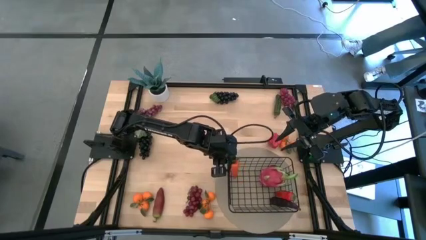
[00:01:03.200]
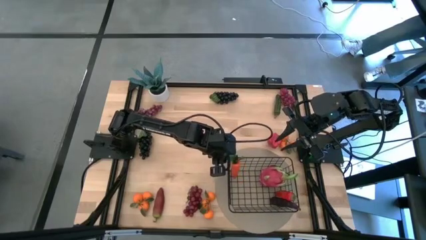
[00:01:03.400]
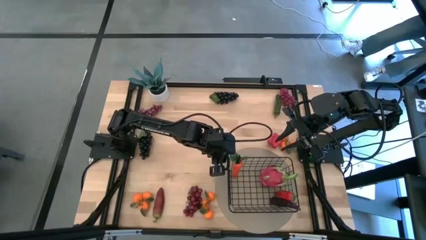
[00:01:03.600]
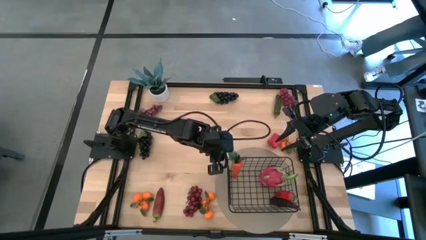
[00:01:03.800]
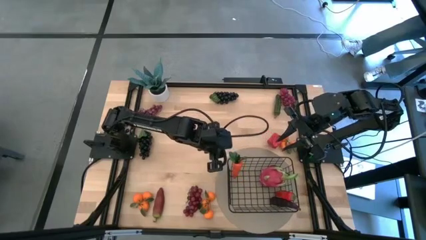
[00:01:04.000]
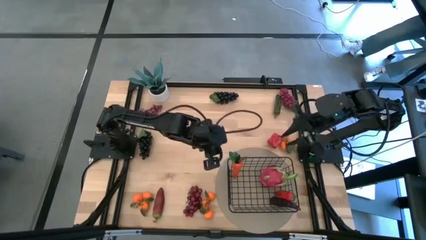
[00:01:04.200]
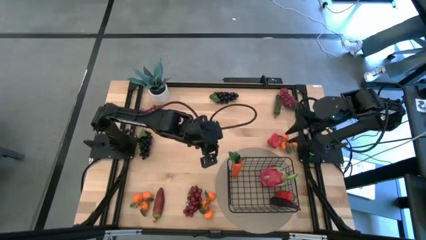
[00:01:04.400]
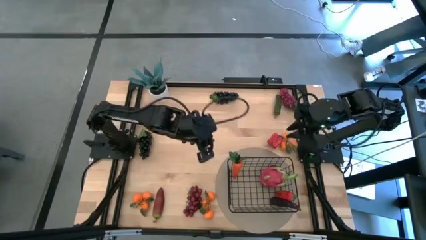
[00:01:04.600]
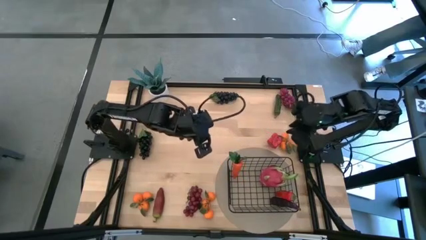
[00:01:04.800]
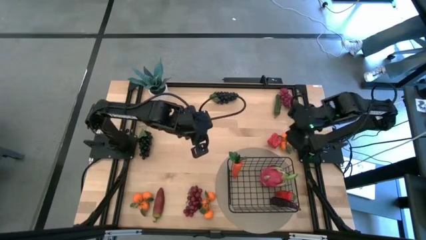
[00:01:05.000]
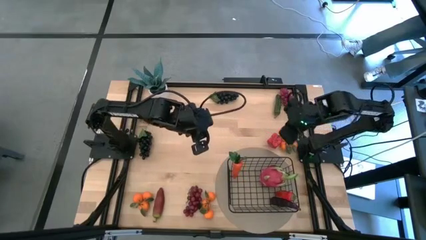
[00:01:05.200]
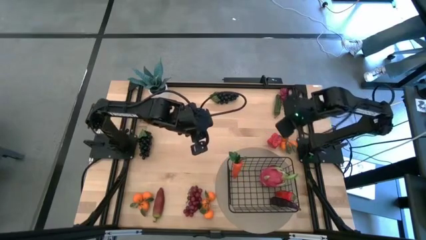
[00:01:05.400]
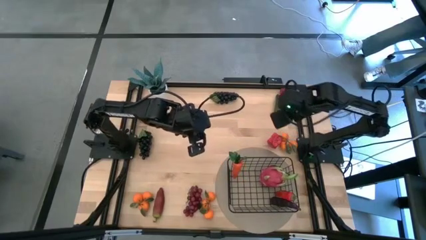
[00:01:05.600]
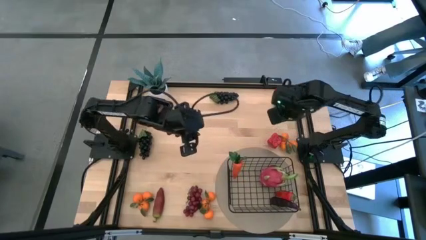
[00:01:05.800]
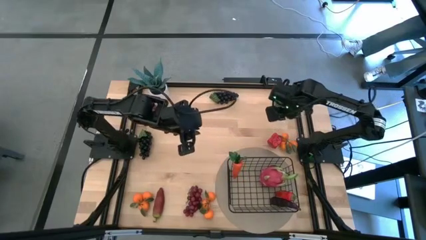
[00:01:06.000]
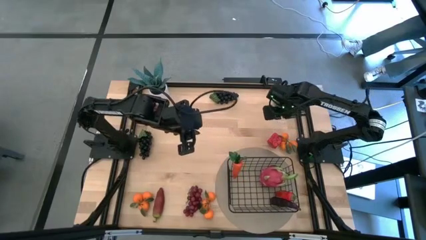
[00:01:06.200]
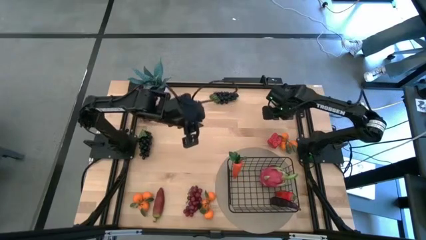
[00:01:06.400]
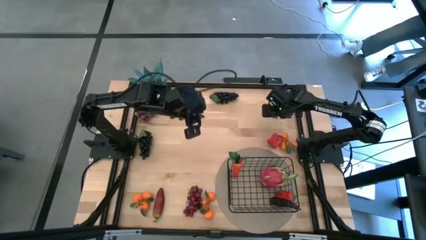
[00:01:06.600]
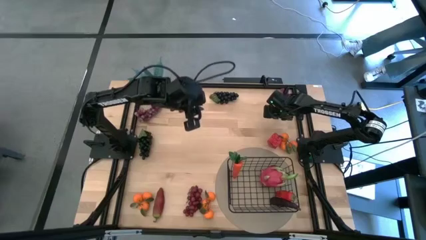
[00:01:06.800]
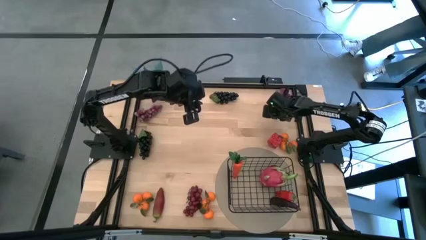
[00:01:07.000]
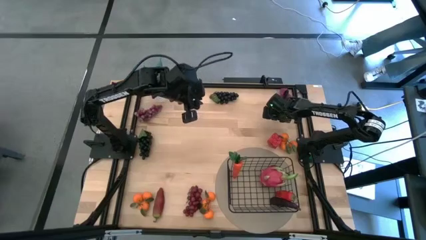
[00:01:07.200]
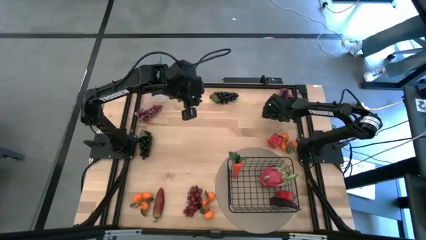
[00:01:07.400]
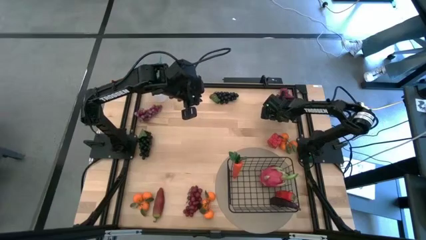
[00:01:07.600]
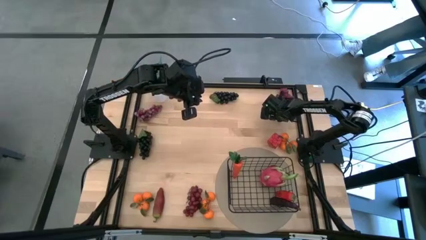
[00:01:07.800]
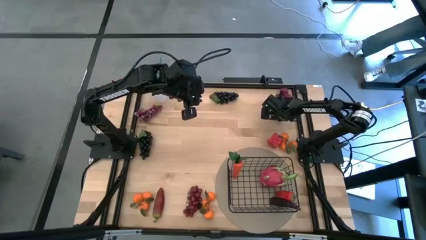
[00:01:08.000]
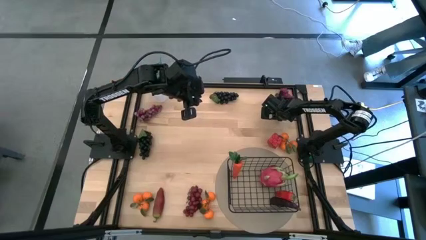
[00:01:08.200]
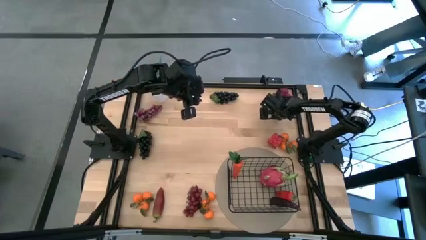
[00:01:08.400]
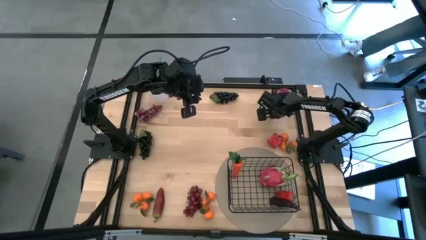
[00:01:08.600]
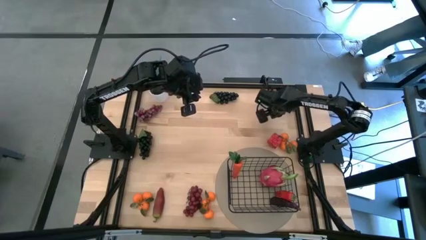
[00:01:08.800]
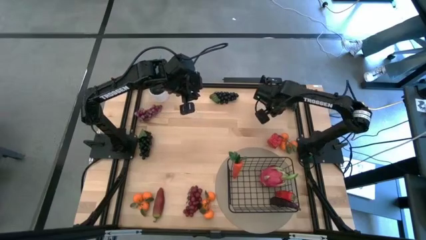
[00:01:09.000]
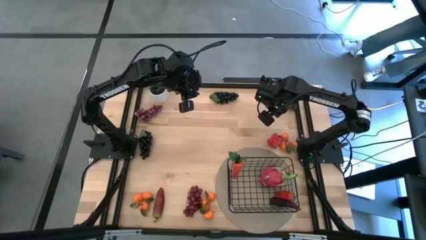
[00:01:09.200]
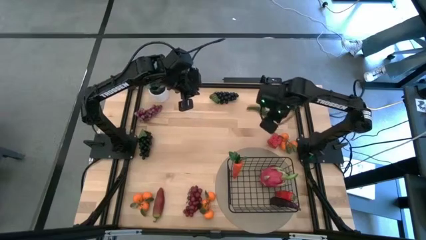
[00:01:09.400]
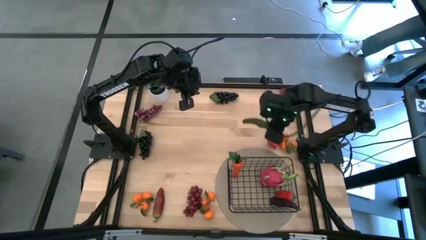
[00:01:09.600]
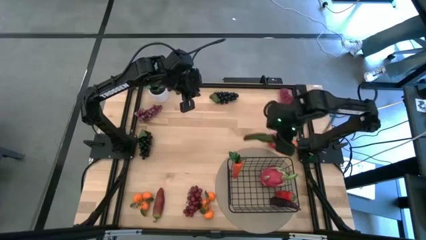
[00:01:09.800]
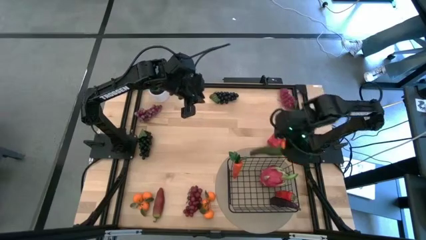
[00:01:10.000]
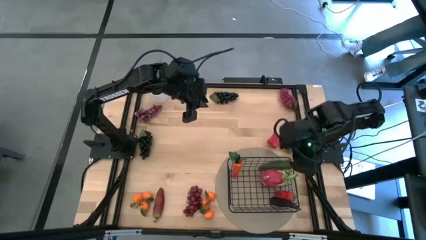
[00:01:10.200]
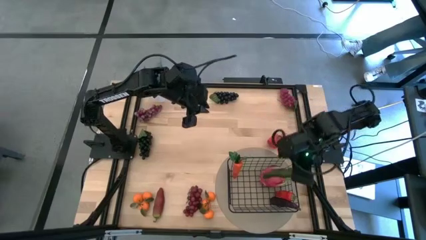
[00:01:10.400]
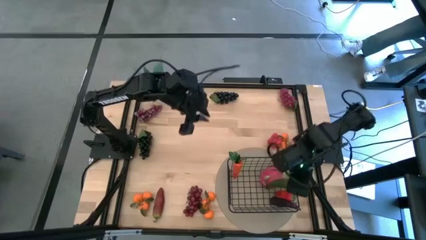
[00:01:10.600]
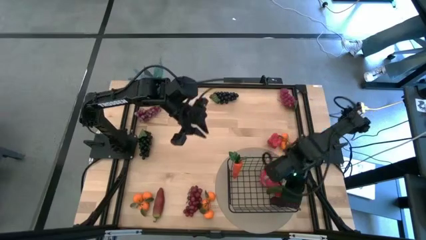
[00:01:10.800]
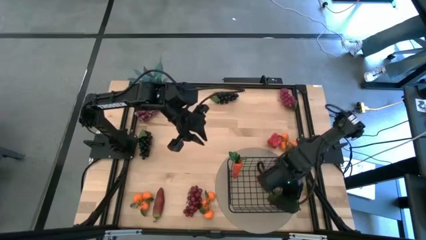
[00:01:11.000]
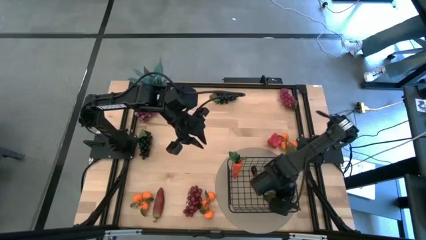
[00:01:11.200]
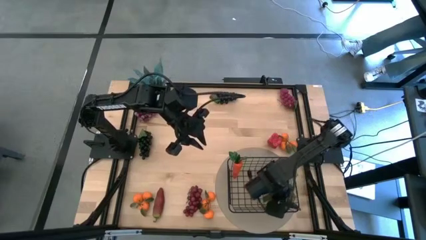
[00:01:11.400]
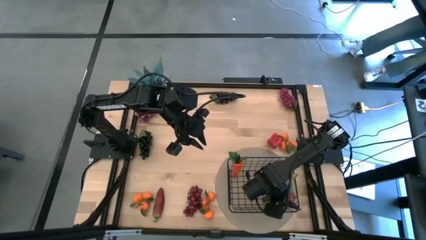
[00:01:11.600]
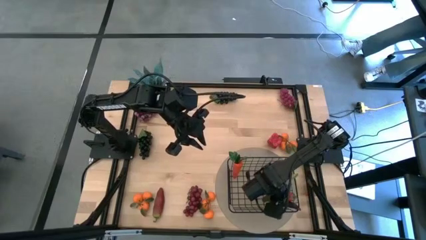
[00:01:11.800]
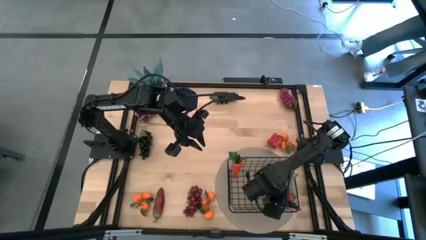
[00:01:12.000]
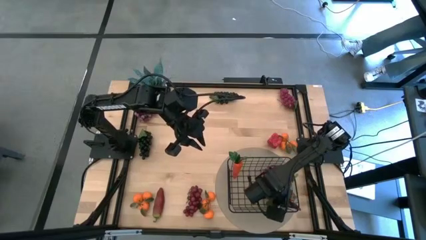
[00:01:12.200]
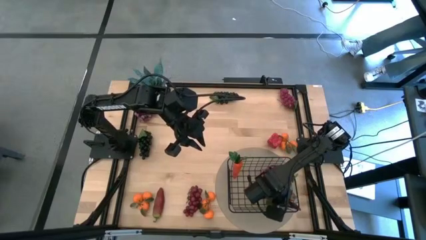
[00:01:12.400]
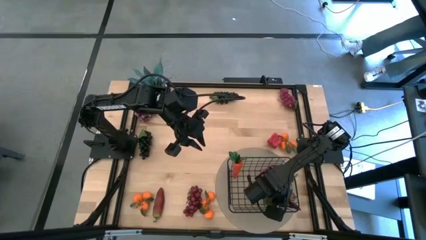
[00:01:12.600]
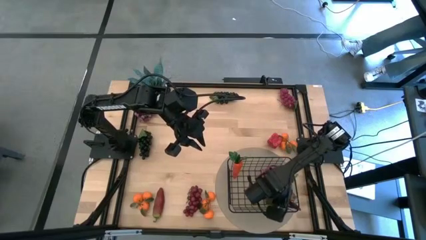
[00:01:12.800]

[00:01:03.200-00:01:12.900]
Task: Build produce basket
Put the top right pepper into the wire basket

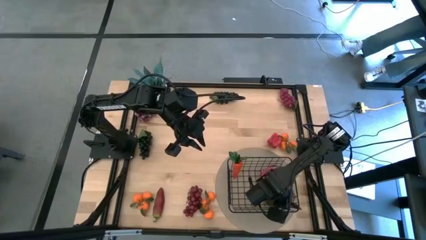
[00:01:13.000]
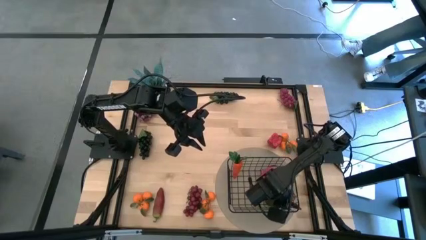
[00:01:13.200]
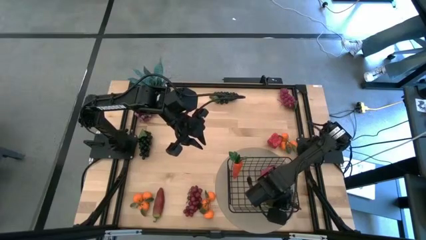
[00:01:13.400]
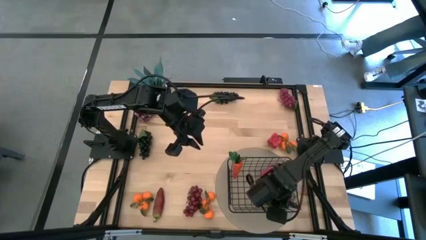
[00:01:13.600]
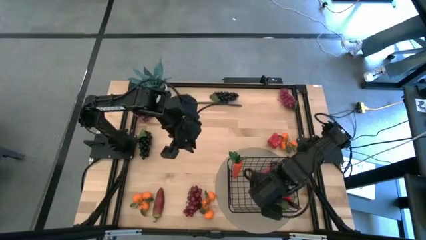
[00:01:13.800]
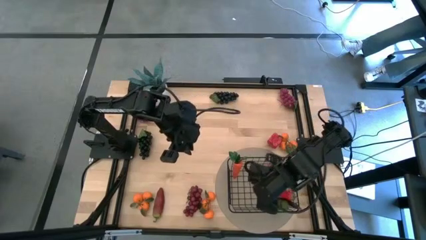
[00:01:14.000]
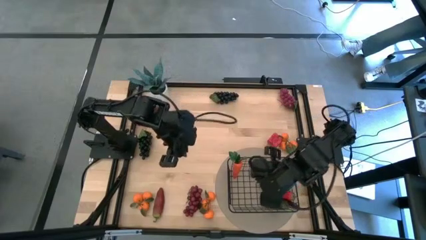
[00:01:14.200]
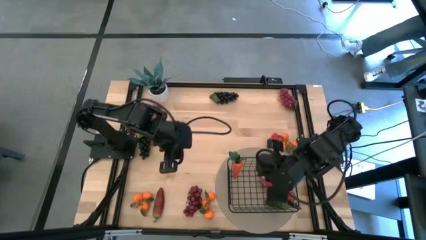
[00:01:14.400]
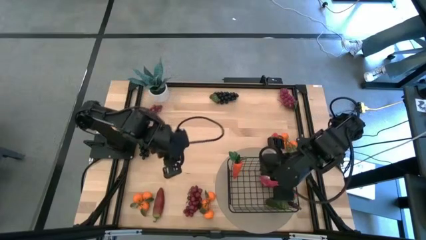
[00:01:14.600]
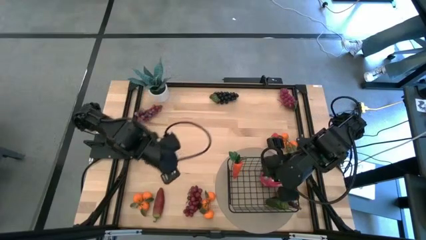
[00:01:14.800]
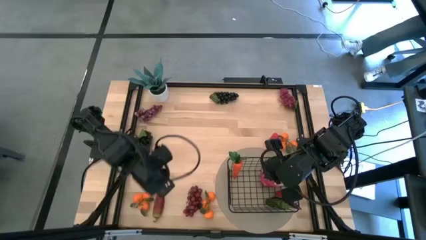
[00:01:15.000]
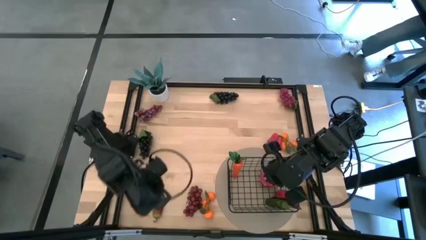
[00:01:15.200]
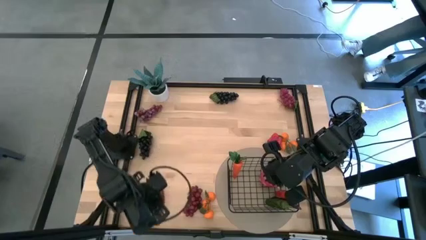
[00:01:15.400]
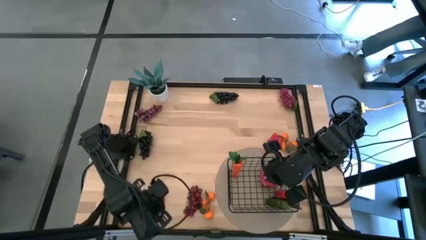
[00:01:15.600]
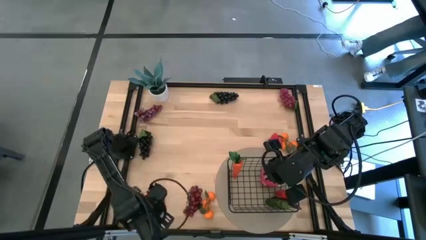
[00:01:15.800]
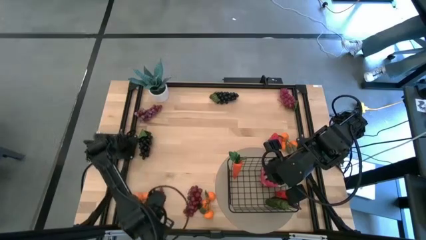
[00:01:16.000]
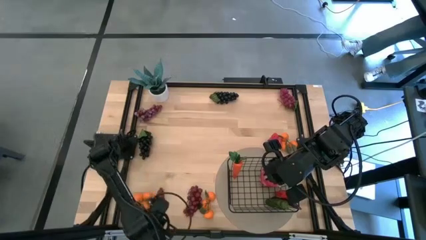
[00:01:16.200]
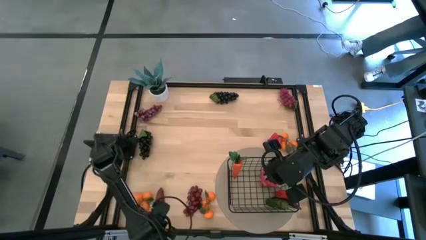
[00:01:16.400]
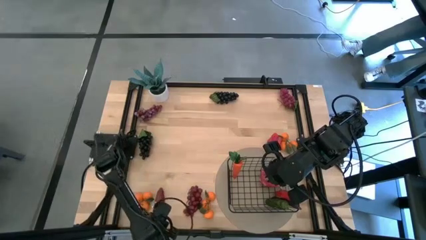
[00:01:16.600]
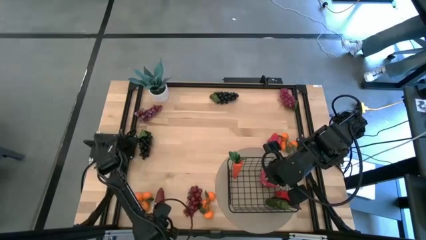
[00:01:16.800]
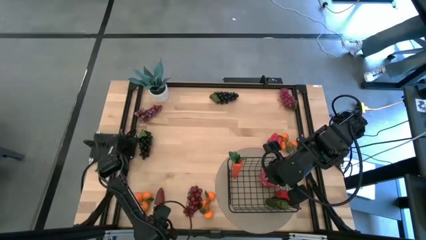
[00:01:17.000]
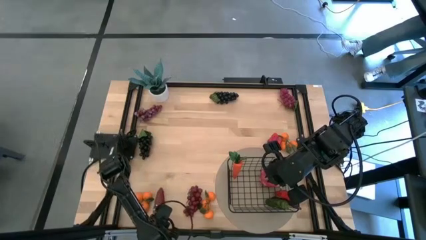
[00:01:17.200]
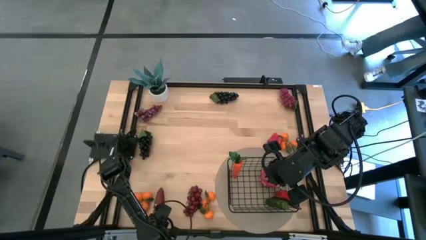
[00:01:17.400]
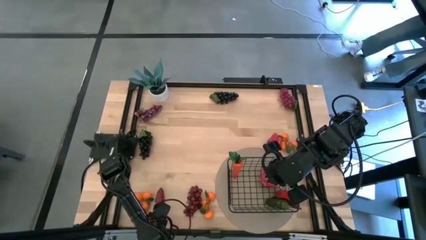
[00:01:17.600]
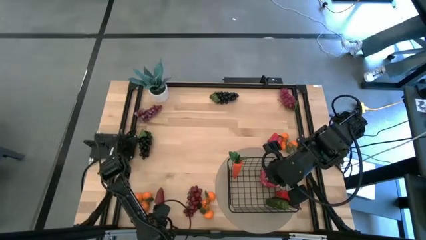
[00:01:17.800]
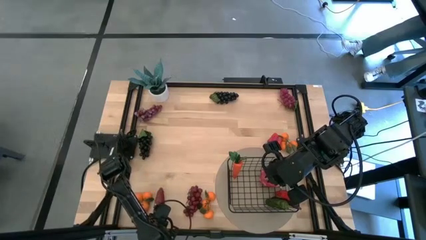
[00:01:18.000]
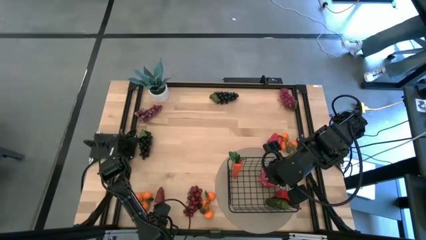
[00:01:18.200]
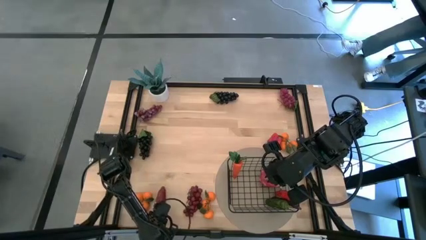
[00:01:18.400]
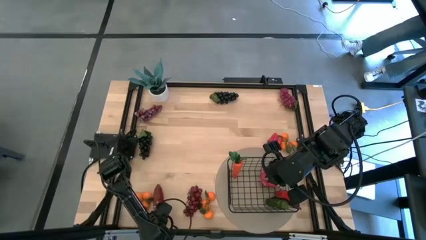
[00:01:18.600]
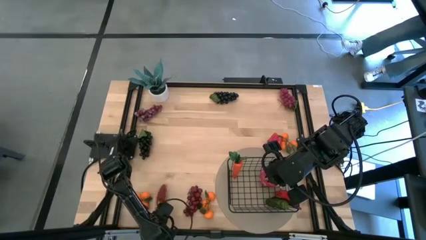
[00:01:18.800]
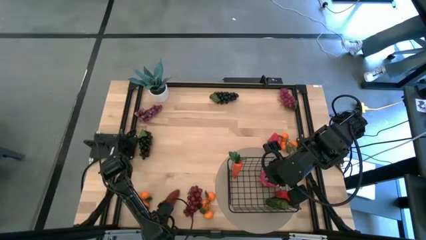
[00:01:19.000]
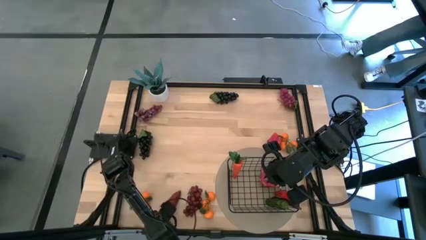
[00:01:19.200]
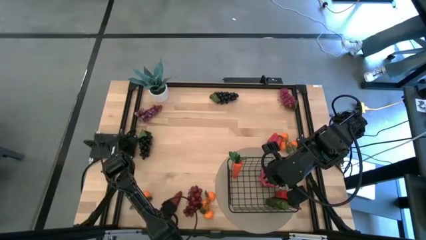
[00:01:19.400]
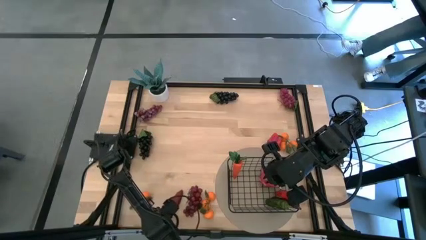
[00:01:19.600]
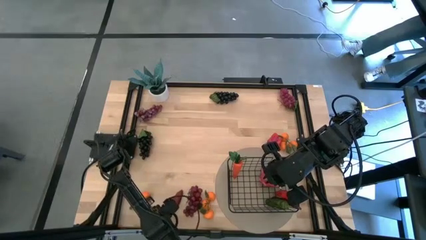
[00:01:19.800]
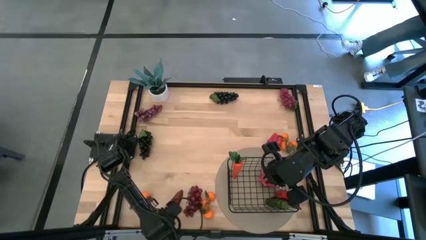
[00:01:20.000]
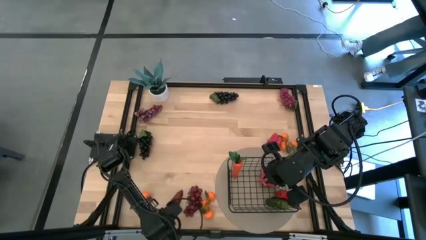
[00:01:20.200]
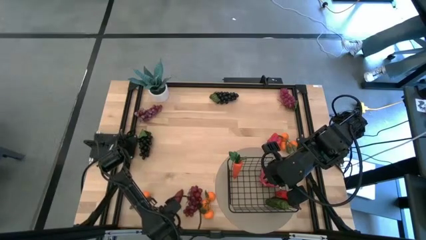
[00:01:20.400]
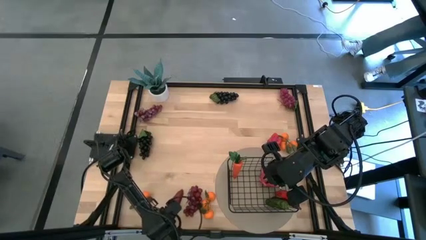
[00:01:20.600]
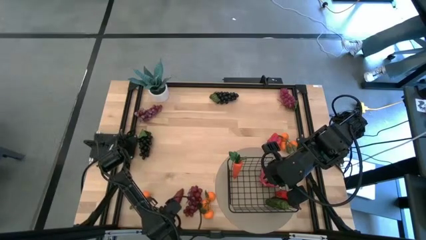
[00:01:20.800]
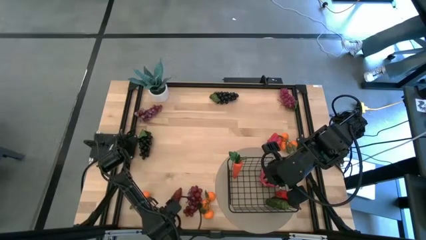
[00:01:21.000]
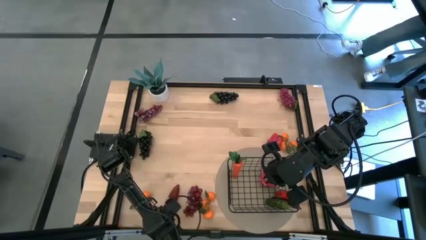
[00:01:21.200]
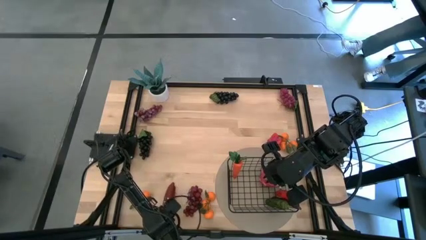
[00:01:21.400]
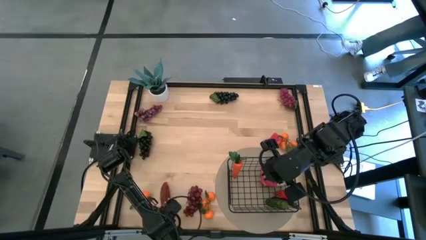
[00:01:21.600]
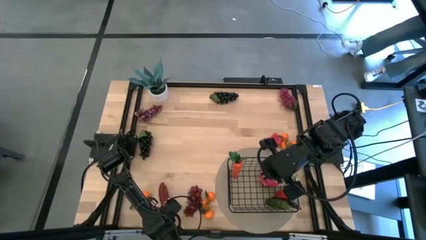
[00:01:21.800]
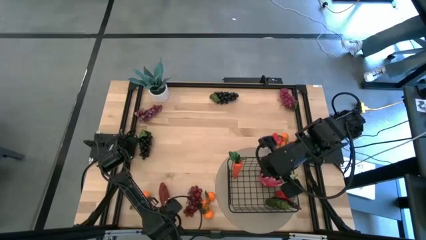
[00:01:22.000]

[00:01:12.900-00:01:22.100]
Put the bottom left pepper into the wire basket
